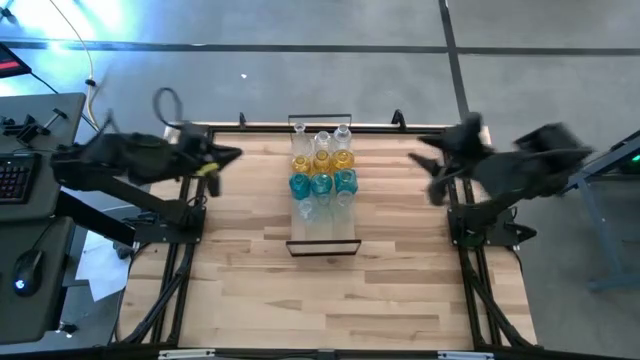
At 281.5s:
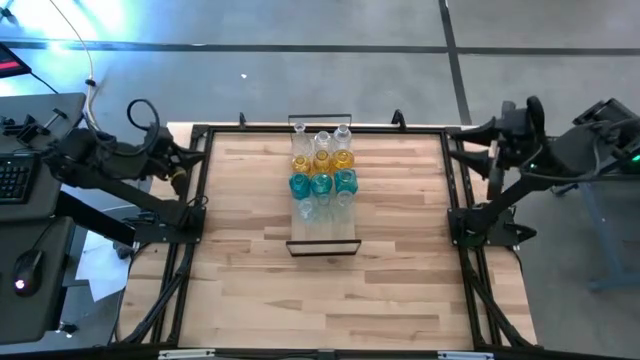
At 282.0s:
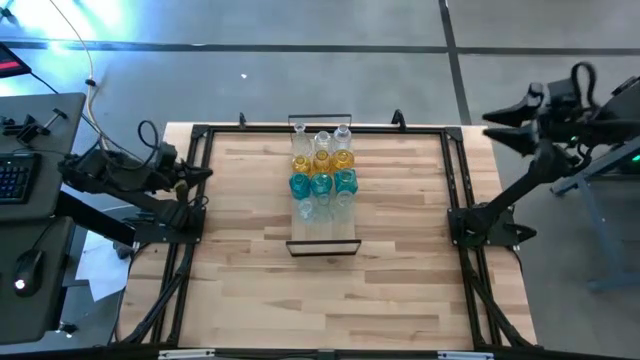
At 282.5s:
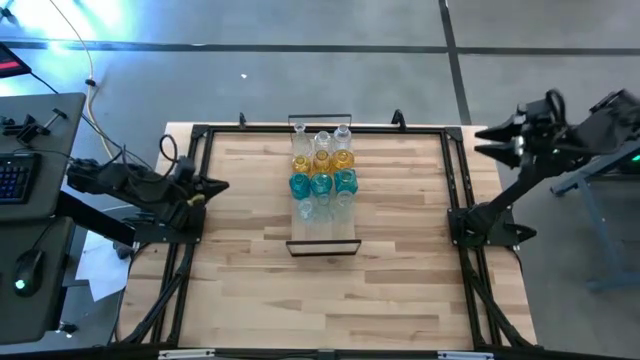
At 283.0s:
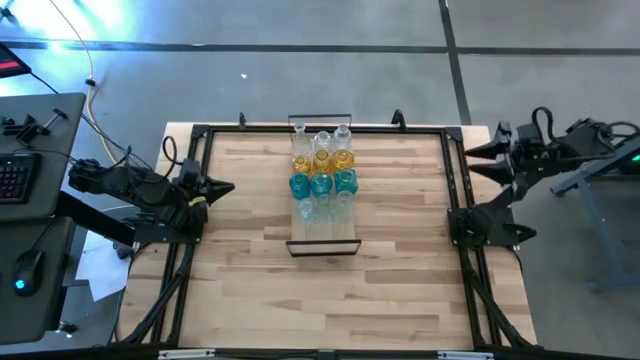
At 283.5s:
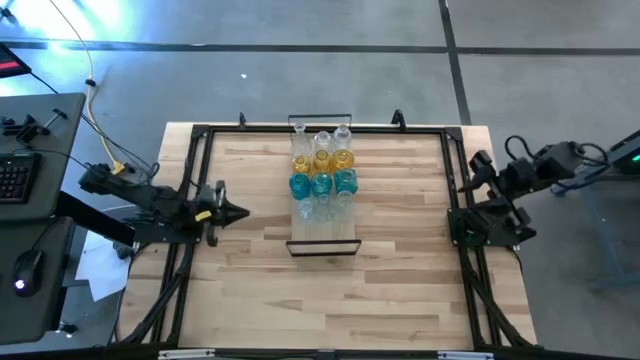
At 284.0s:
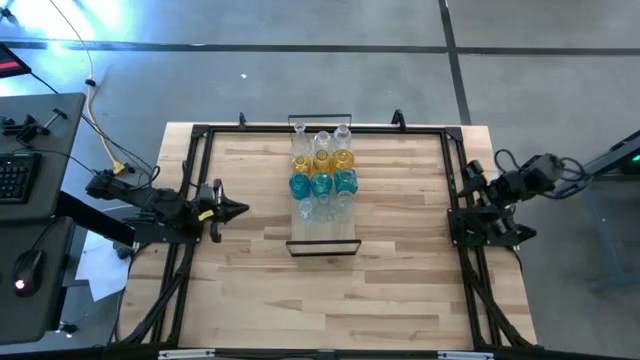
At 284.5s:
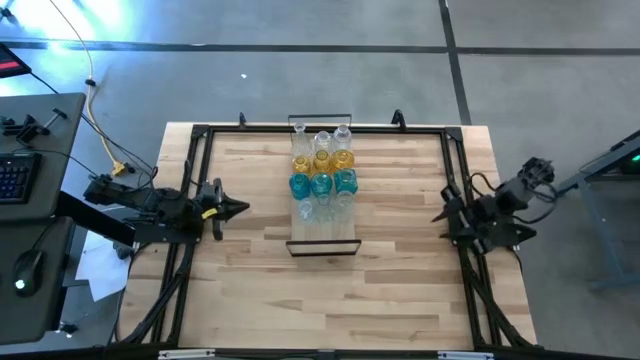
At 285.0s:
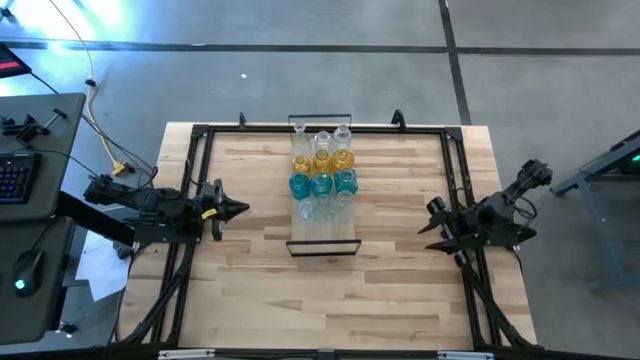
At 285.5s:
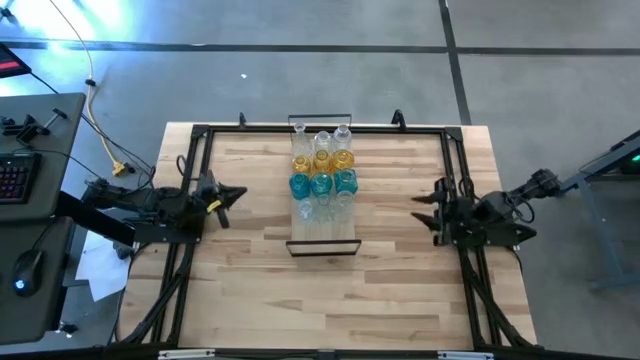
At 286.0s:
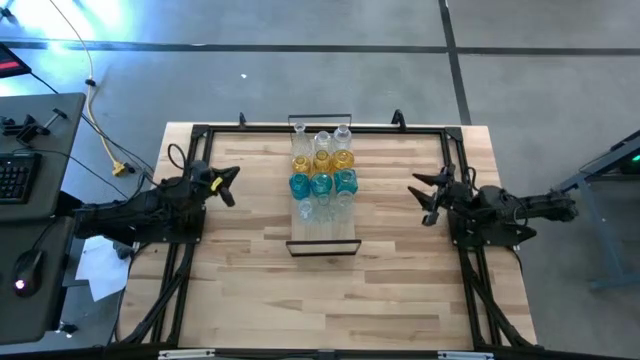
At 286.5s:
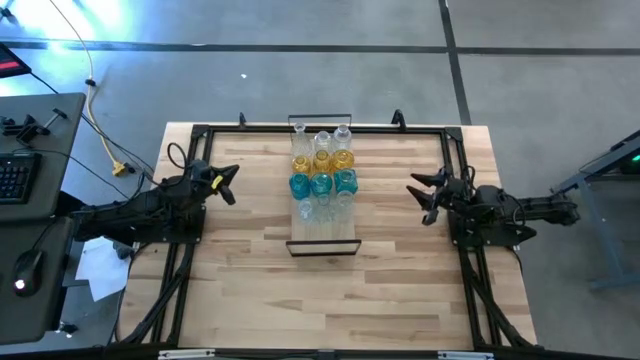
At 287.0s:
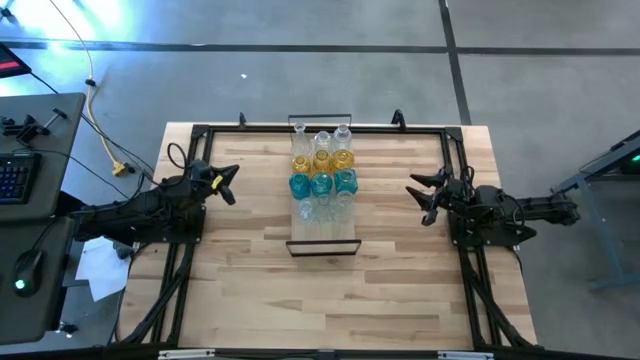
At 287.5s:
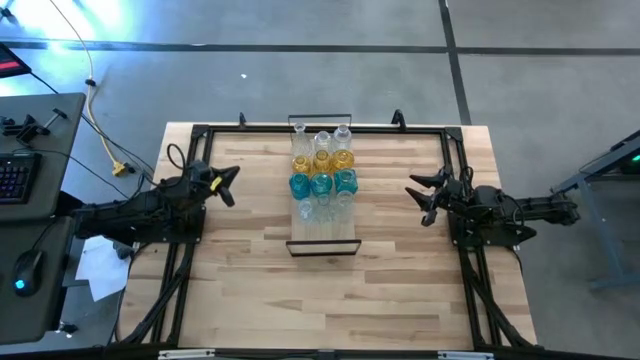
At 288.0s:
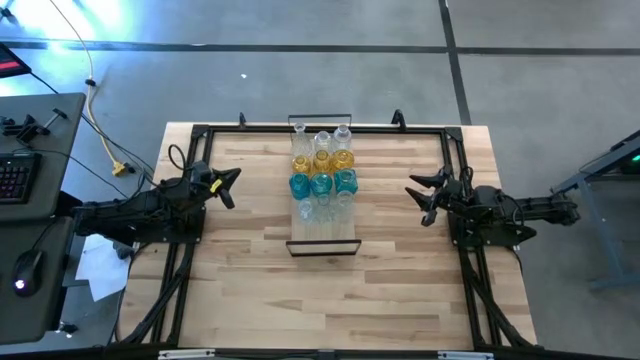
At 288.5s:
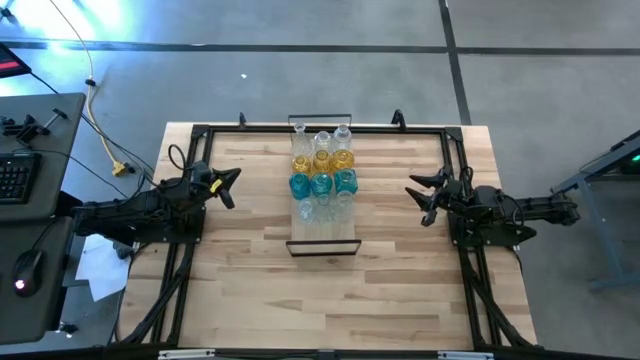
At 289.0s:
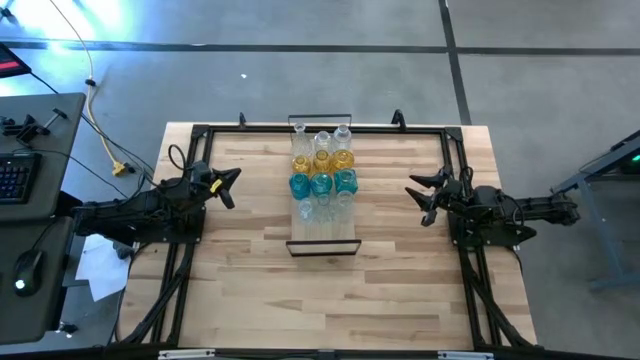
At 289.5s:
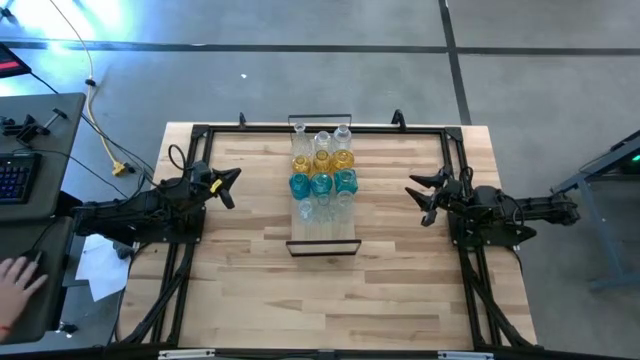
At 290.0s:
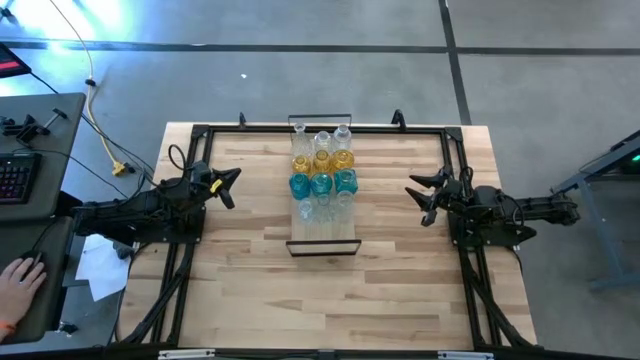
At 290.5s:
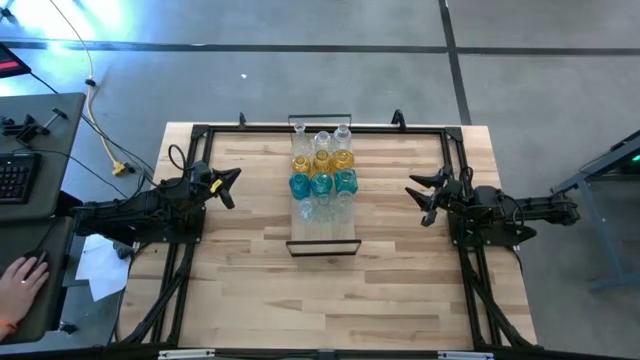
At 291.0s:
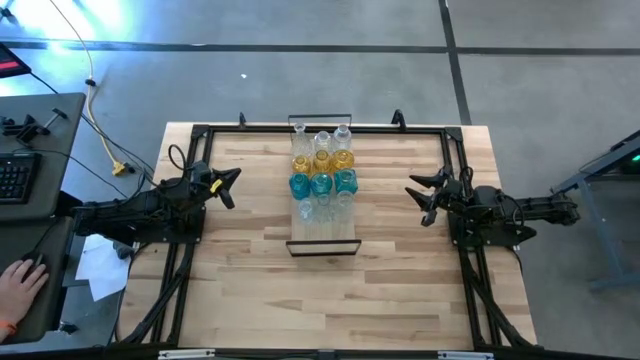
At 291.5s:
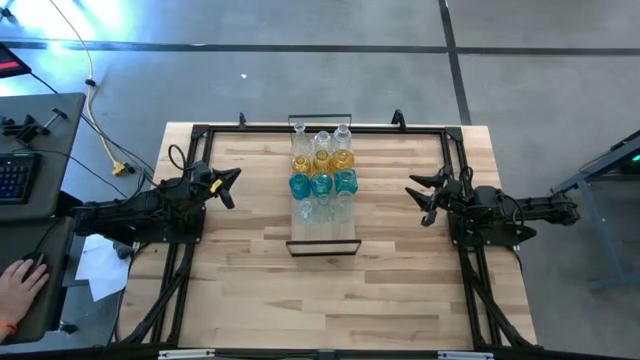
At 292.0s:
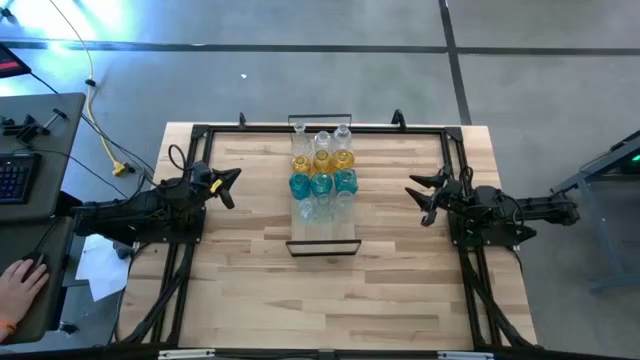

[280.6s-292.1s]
Task: sort vases onto shelf
Return to Home Position

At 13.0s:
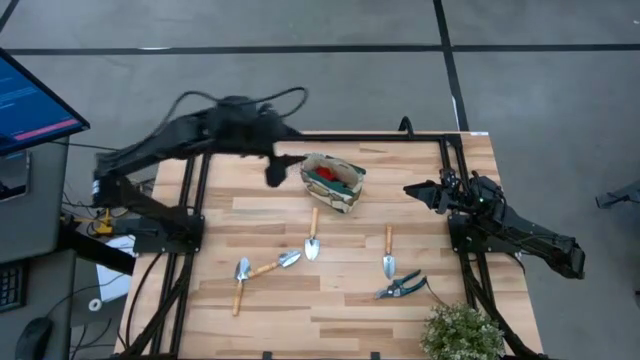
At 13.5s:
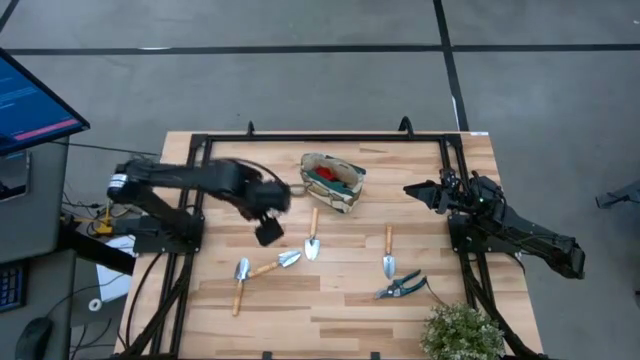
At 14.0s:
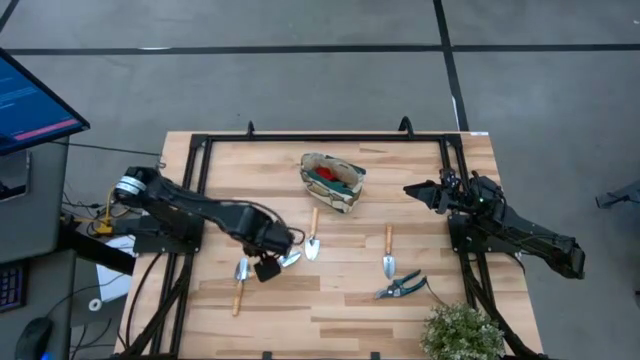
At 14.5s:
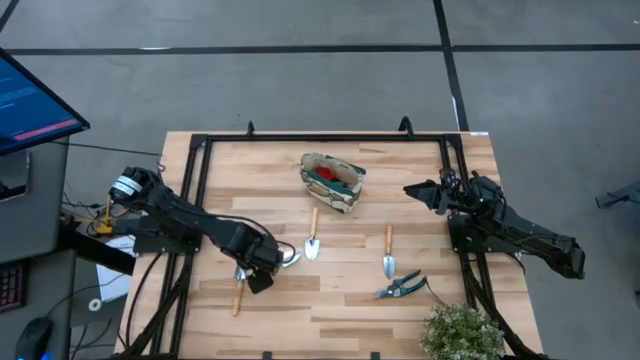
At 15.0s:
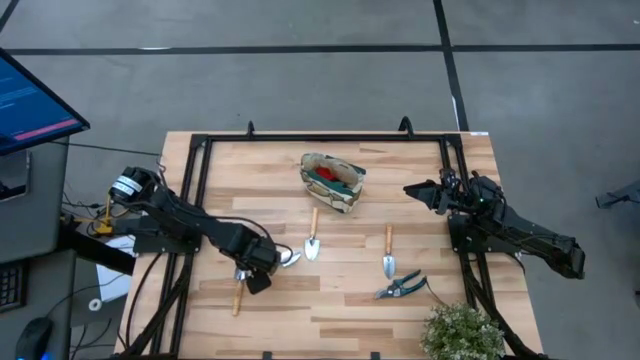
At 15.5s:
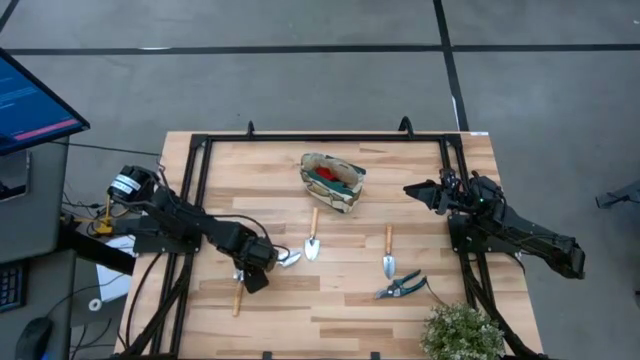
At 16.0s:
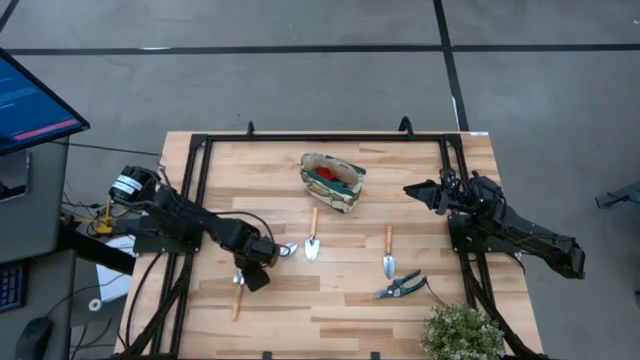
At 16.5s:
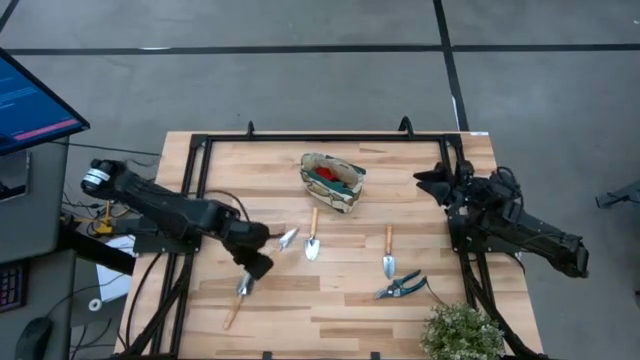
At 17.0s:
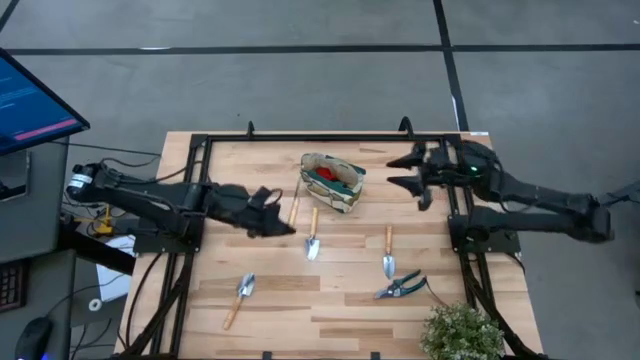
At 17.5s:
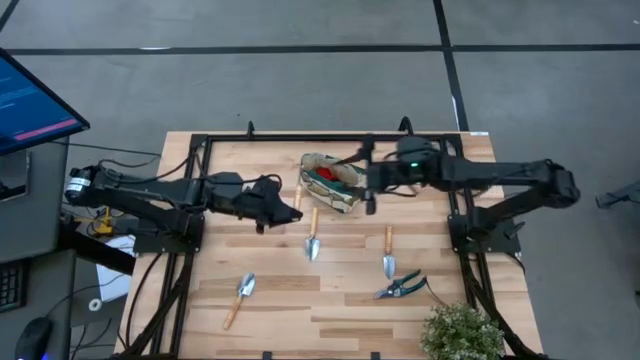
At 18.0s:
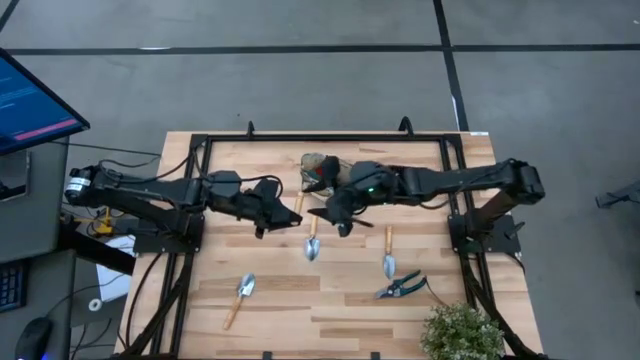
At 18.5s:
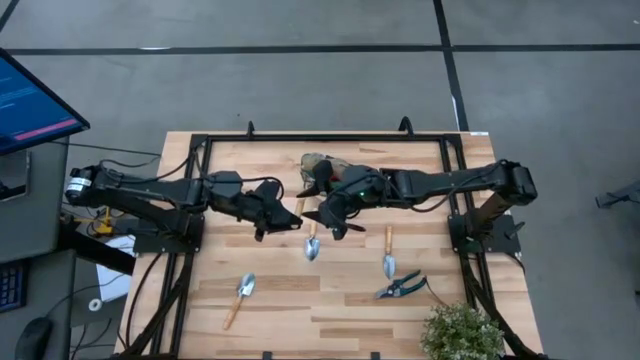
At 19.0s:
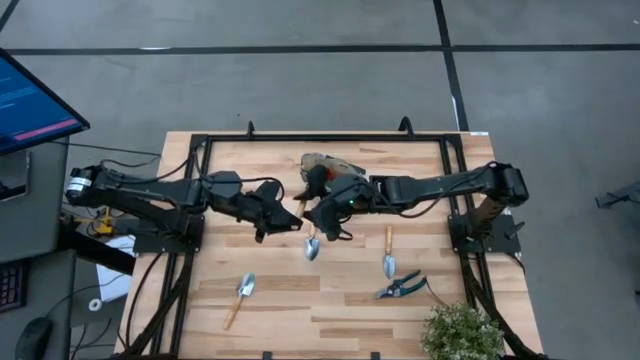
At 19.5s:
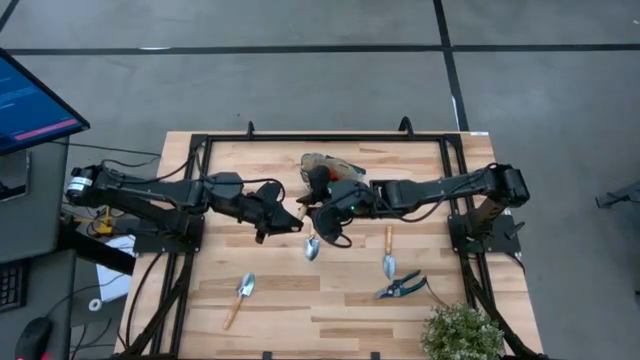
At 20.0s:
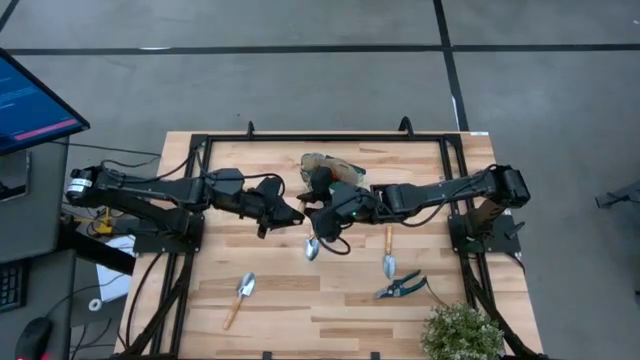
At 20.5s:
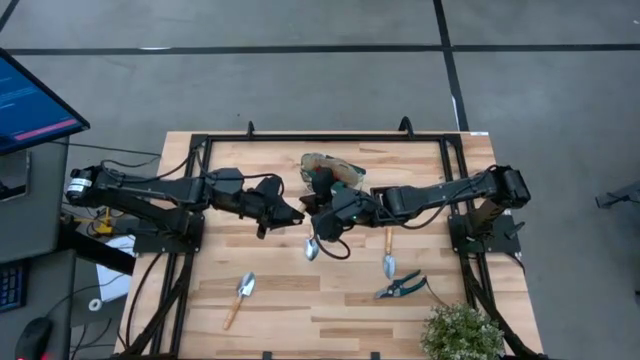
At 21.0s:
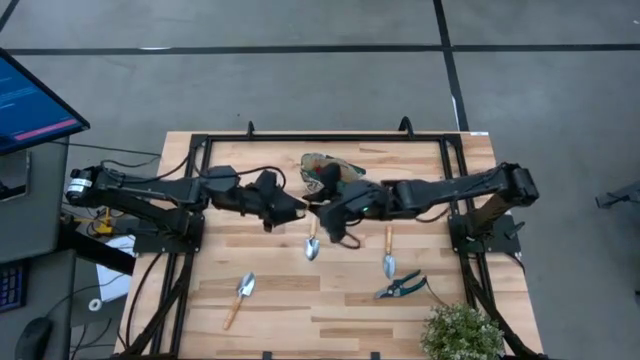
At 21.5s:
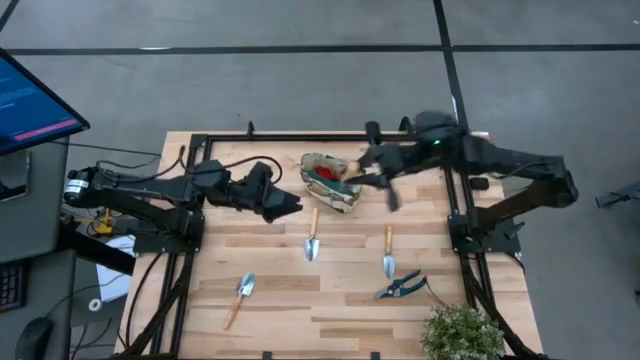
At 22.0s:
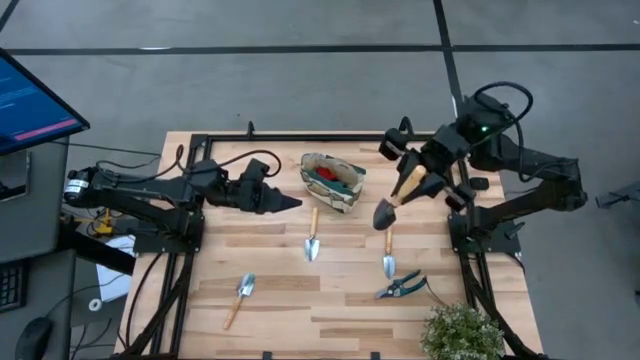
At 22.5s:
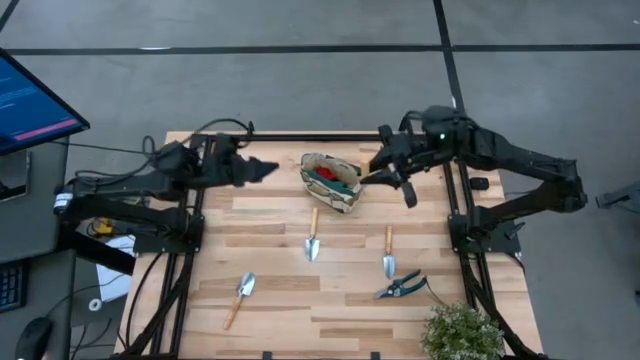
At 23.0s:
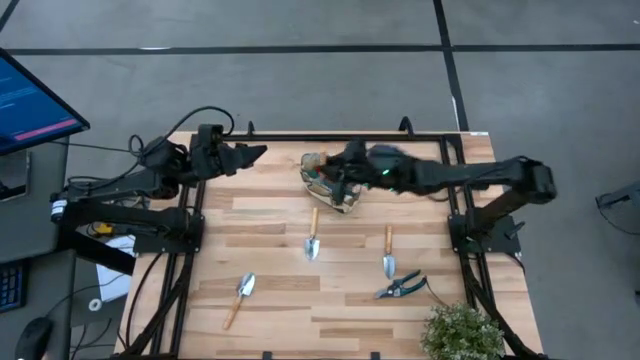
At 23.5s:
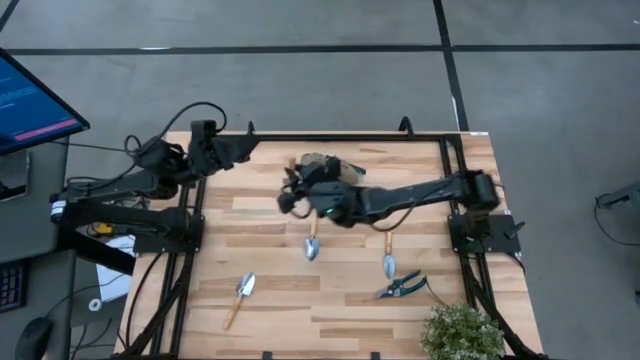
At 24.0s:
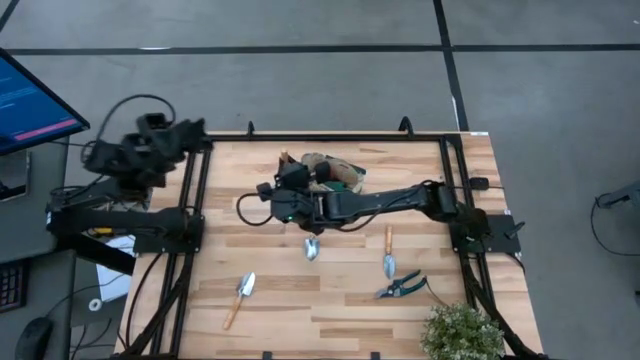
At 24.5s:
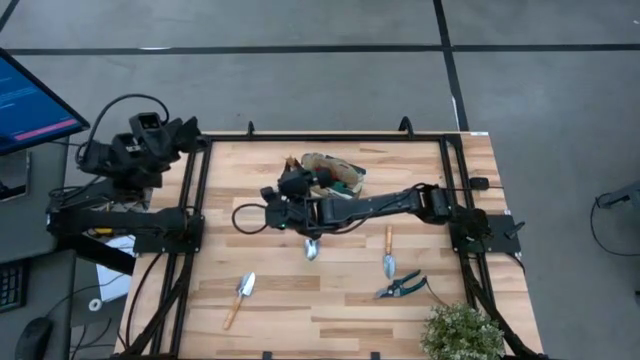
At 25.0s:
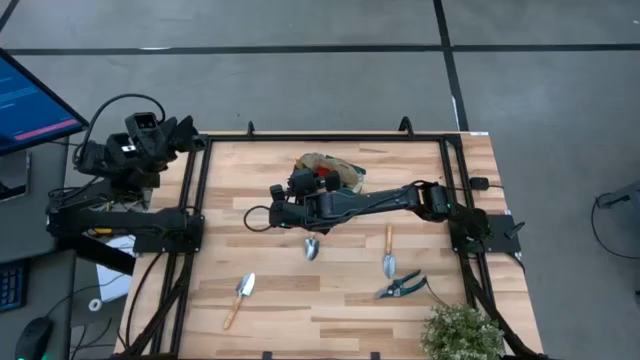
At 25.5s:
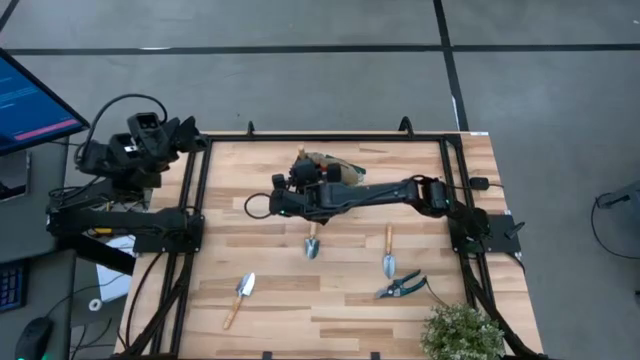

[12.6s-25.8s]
Task: Pick & Place Garden tools in Gardening bag
Put the brown trowel into the gardening bag
